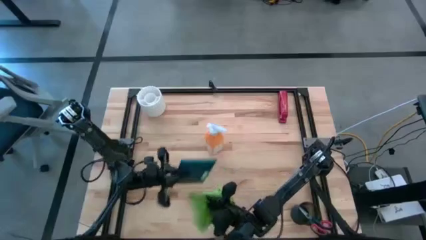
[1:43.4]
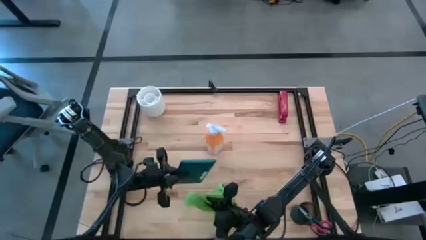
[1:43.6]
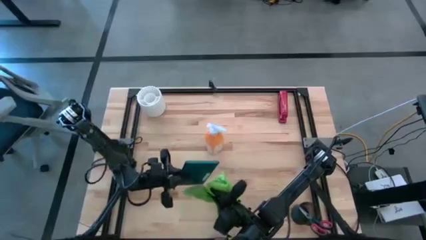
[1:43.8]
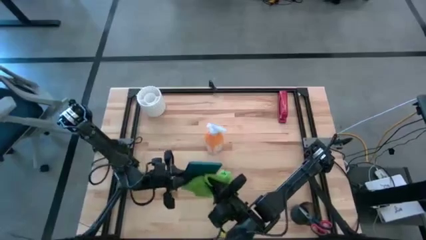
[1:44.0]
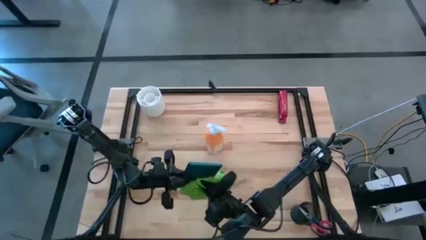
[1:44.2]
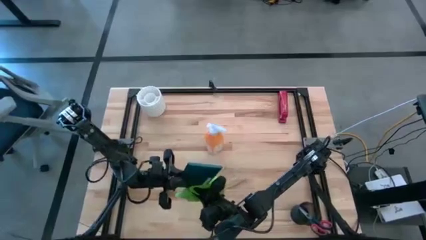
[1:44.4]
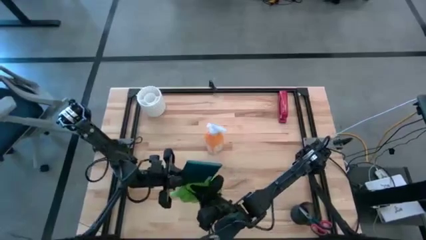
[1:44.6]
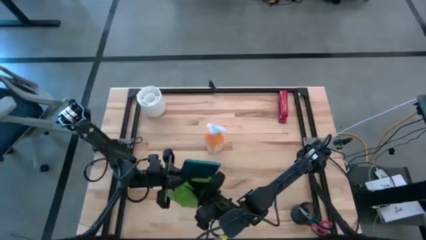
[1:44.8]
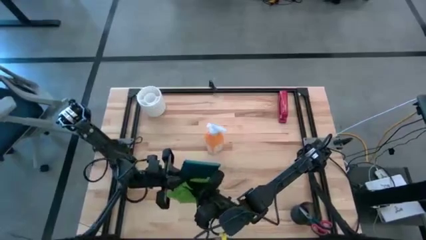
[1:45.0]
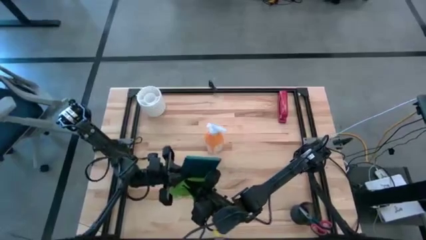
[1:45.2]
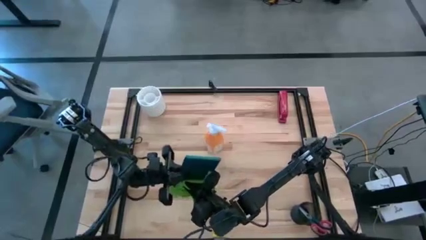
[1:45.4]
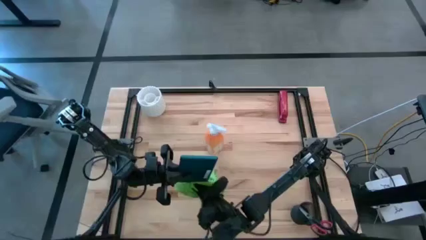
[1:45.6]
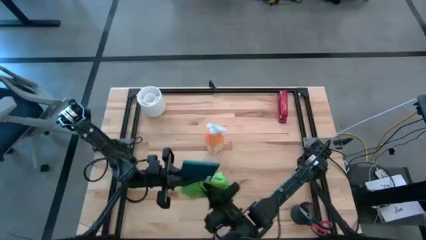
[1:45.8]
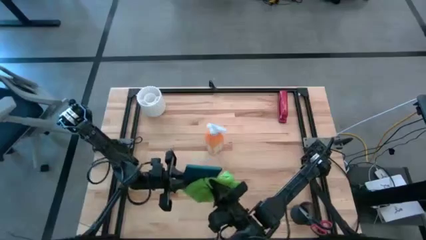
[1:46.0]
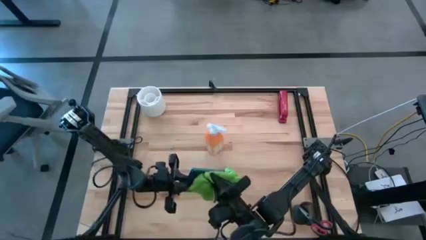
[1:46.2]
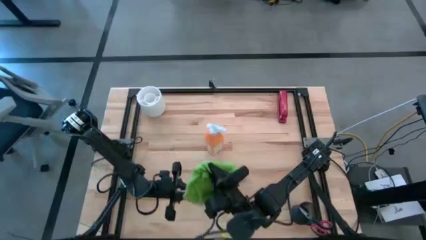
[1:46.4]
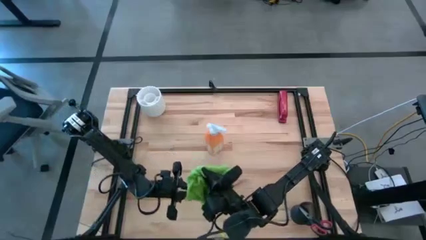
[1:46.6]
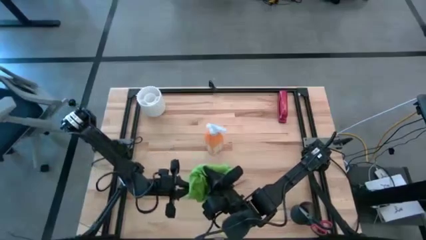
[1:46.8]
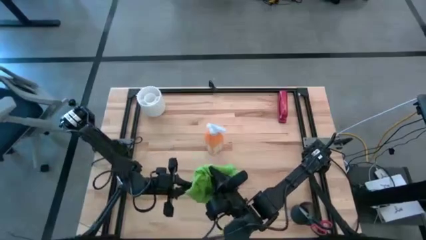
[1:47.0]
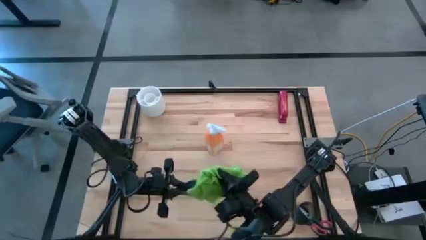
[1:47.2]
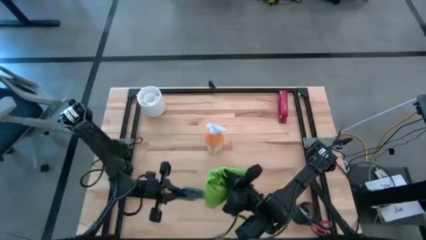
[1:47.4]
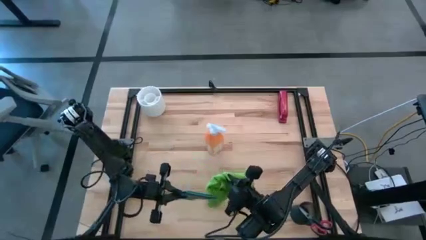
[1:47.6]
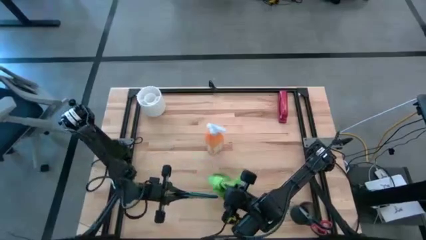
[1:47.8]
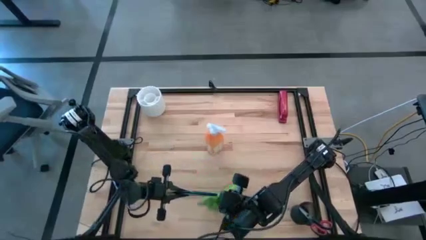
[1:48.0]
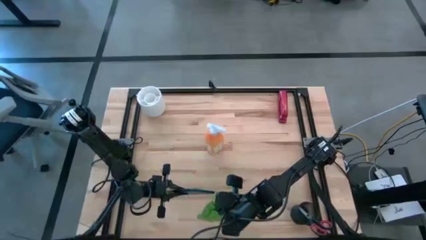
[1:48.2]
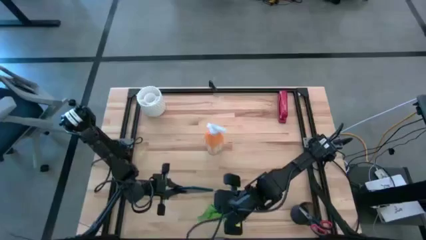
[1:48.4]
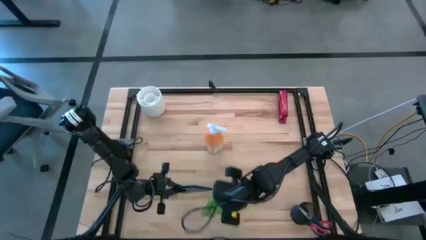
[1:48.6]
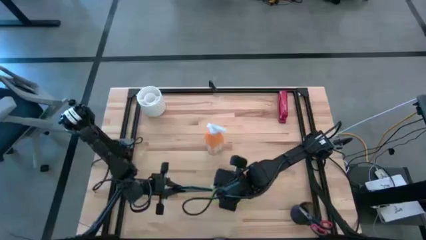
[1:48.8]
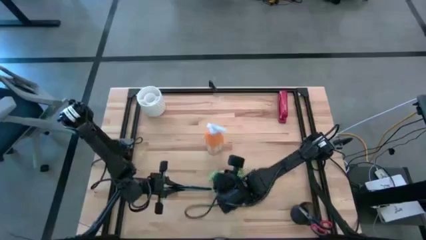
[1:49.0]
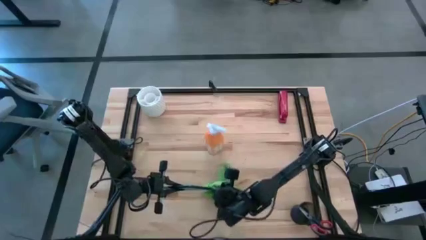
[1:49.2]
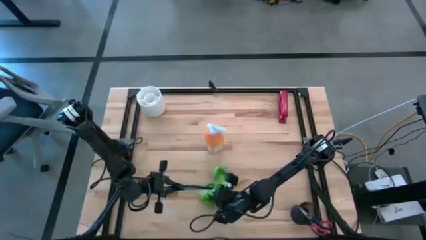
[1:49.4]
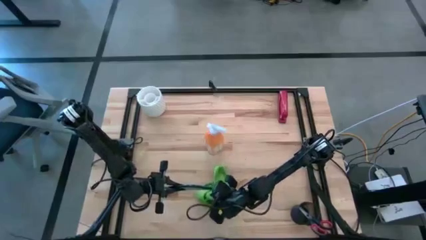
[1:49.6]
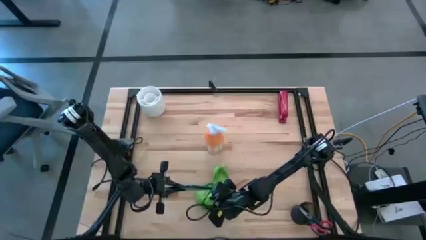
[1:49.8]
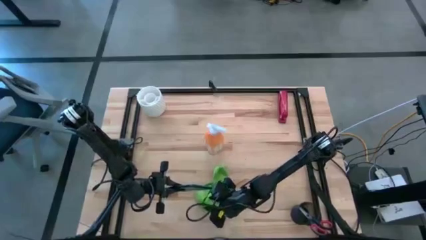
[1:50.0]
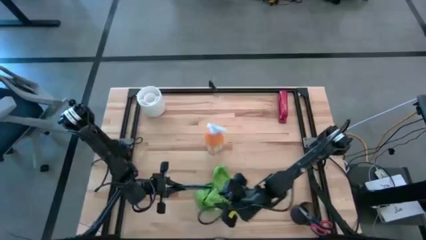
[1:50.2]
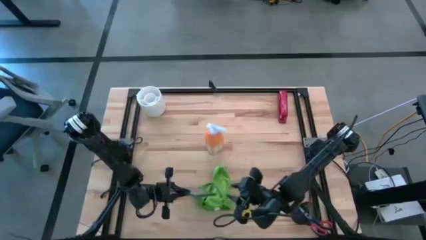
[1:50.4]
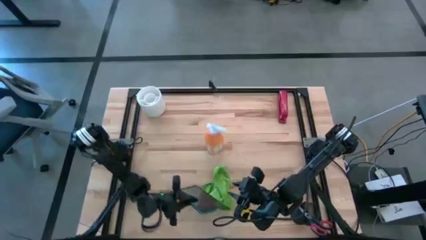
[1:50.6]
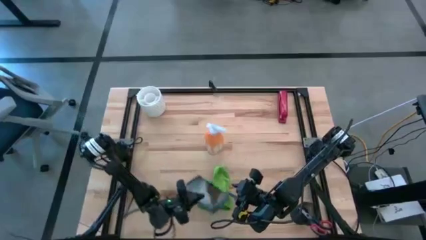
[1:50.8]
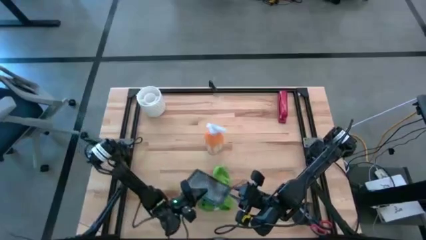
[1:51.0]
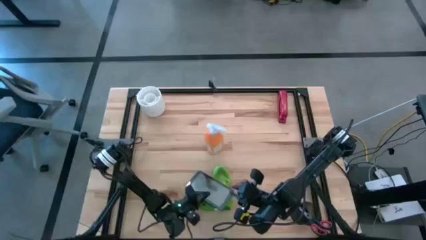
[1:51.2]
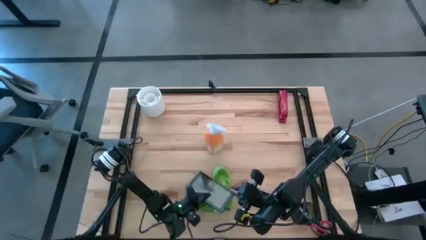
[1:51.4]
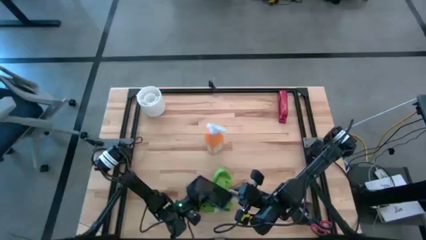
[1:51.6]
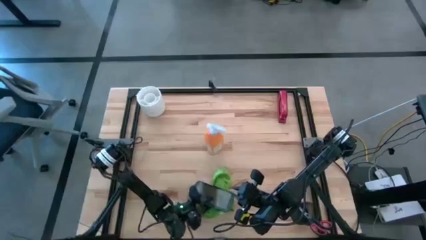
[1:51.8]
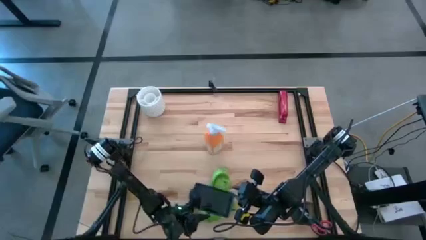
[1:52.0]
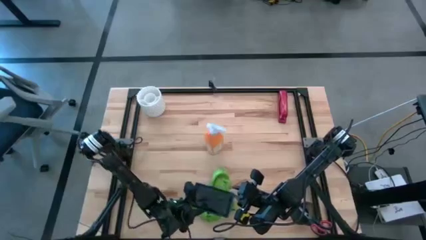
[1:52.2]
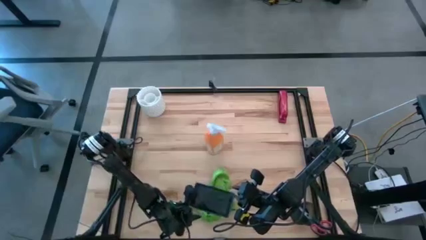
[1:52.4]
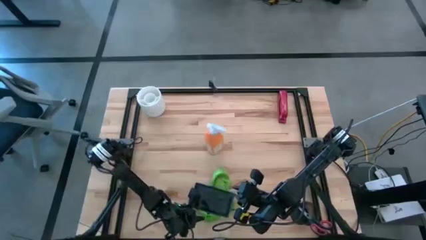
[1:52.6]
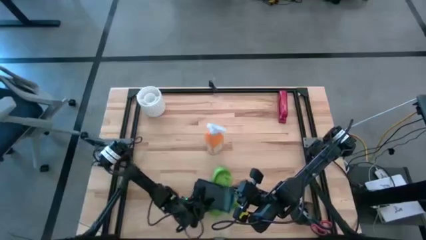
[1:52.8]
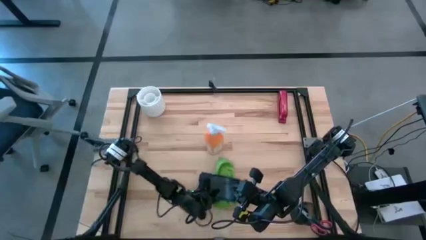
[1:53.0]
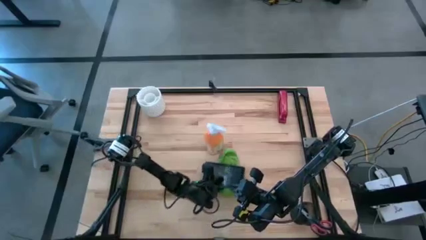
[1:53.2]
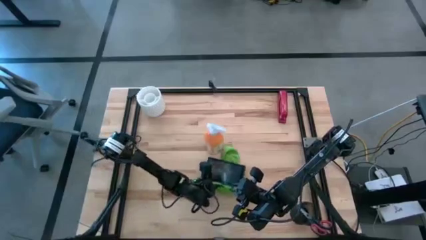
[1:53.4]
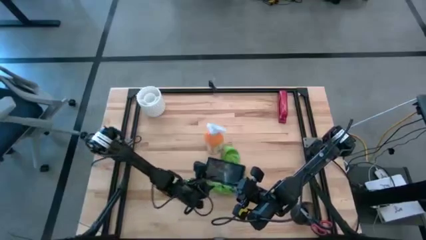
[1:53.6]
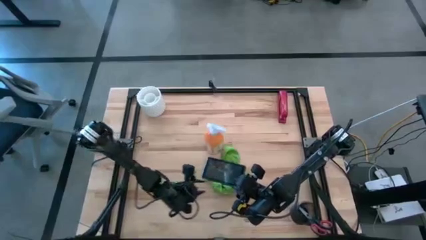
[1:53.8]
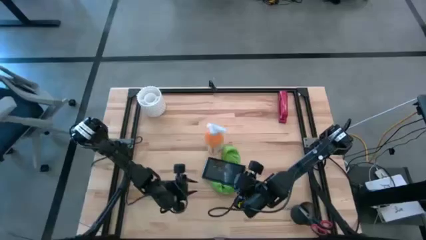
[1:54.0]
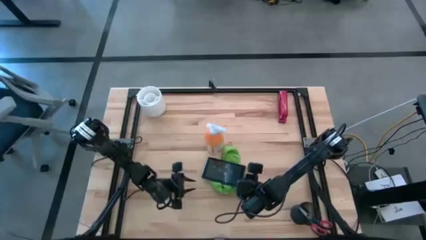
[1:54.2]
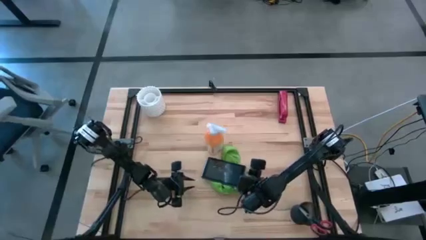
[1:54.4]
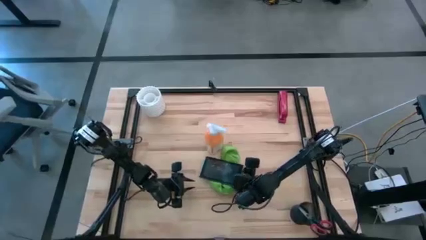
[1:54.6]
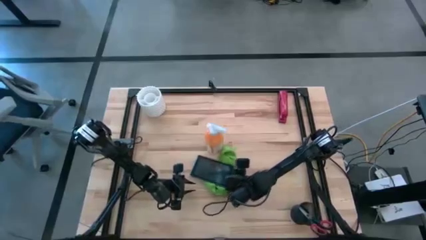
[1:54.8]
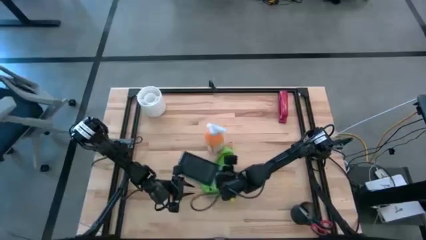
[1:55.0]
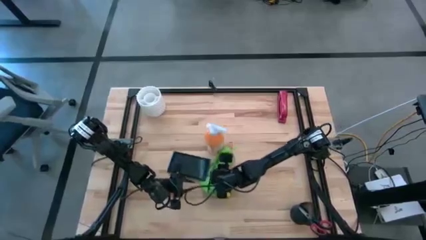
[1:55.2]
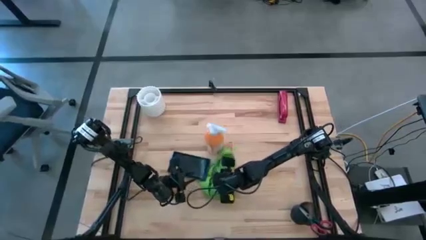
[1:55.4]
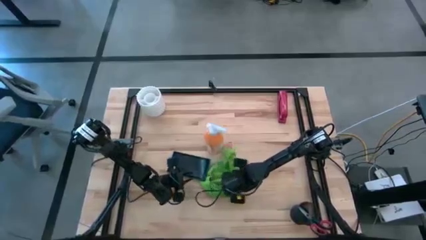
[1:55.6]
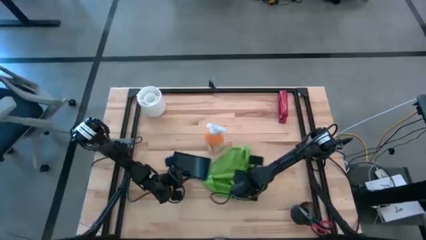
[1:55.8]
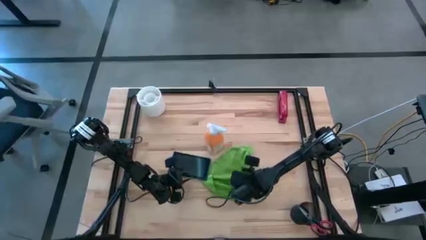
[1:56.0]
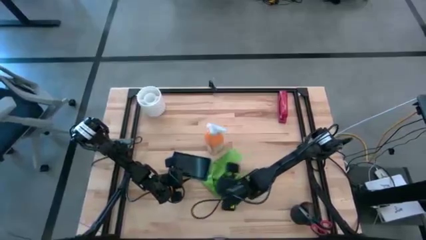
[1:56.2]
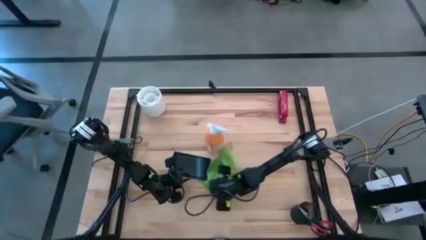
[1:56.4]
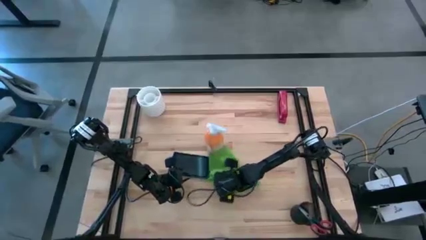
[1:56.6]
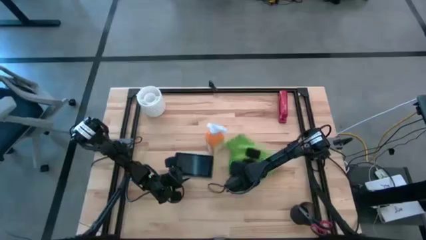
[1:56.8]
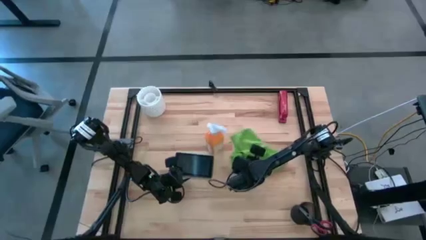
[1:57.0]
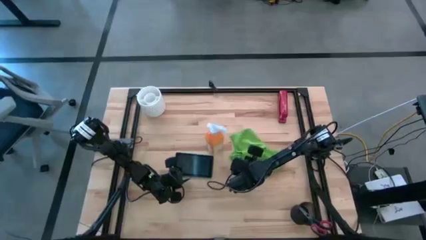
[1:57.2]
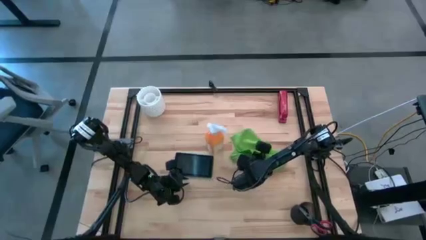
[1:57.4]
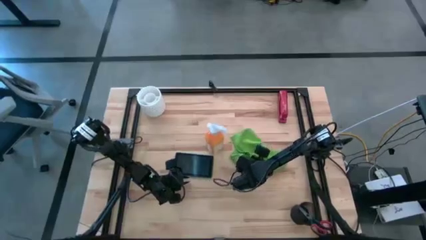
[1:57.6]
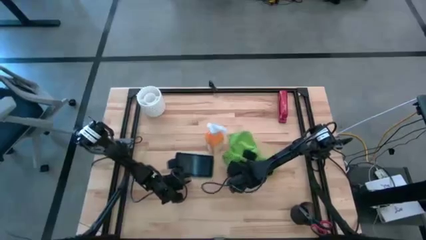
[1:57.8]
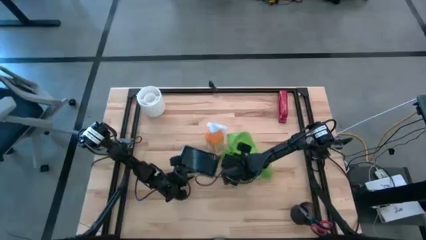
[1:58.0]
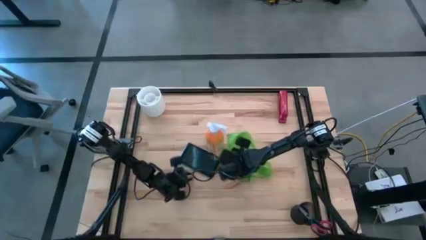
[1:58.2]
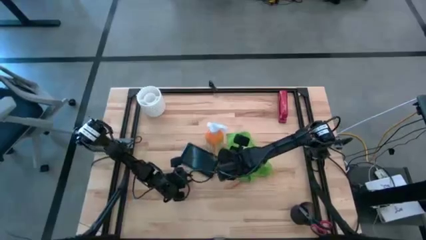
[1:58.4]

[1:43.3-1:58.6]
Task: Apply microfiber cloth
Wipe the blue tablet with the green microfiber cloth
